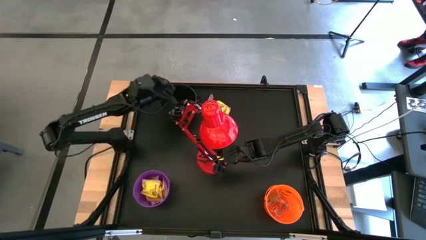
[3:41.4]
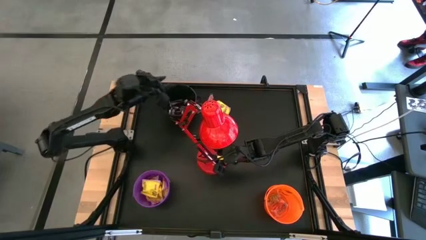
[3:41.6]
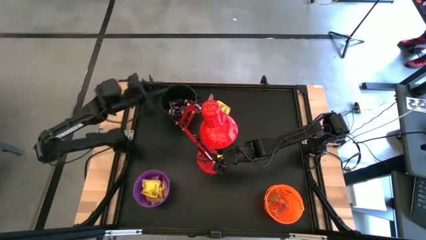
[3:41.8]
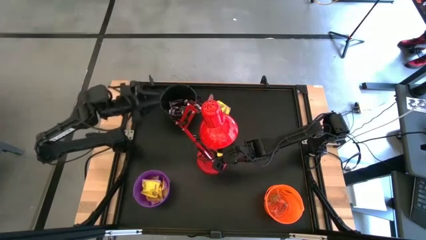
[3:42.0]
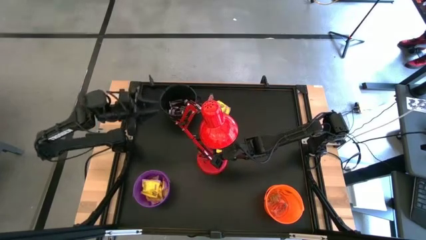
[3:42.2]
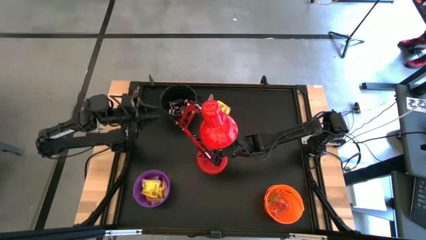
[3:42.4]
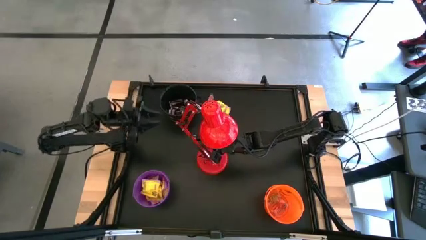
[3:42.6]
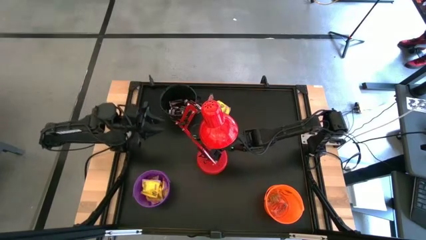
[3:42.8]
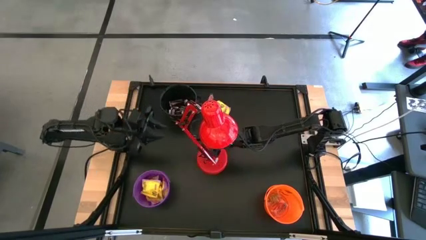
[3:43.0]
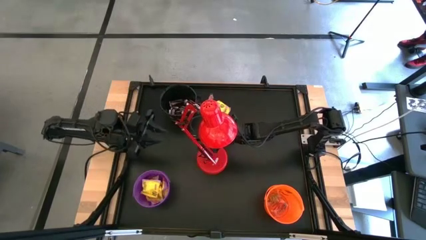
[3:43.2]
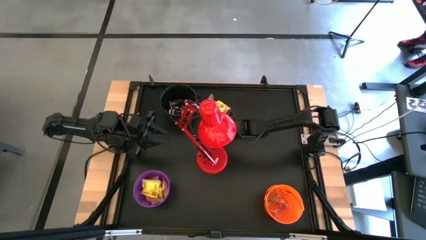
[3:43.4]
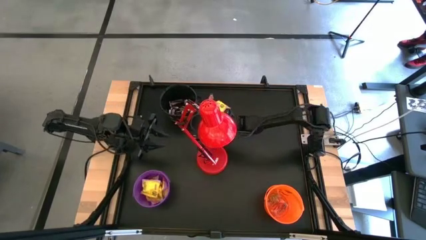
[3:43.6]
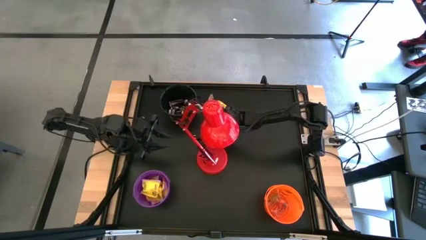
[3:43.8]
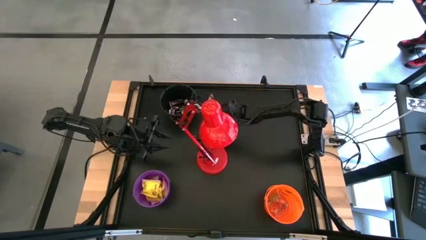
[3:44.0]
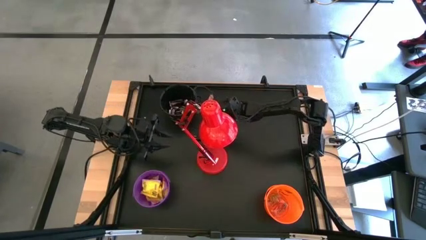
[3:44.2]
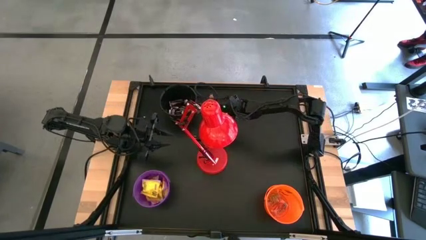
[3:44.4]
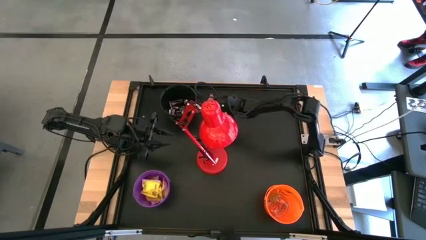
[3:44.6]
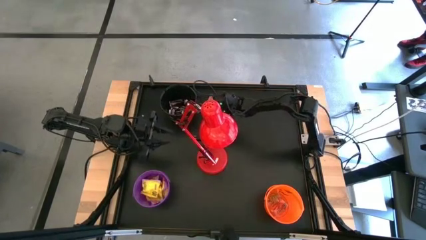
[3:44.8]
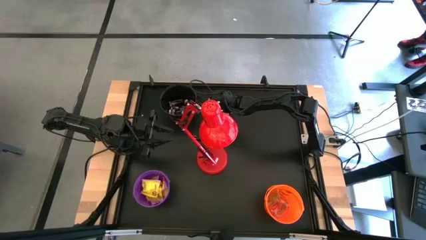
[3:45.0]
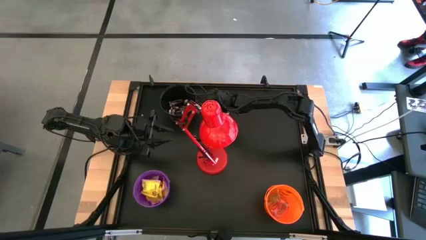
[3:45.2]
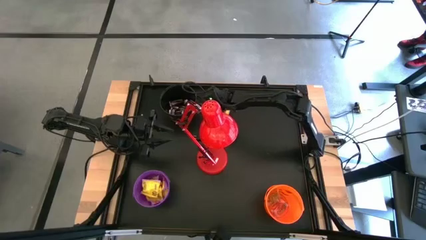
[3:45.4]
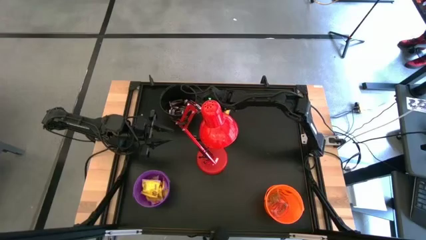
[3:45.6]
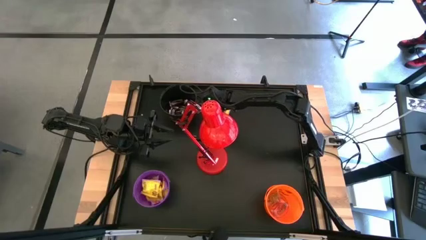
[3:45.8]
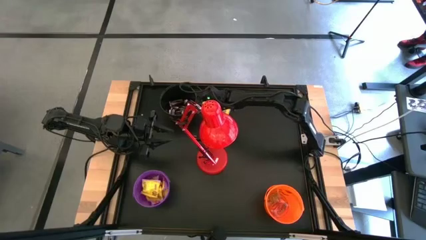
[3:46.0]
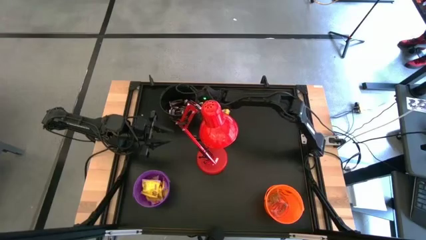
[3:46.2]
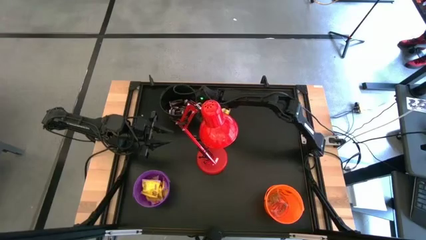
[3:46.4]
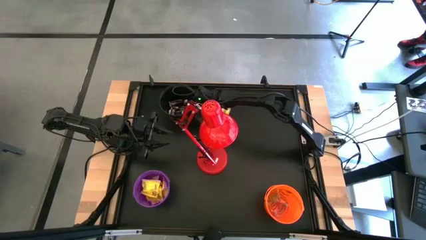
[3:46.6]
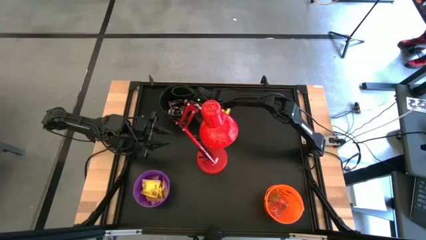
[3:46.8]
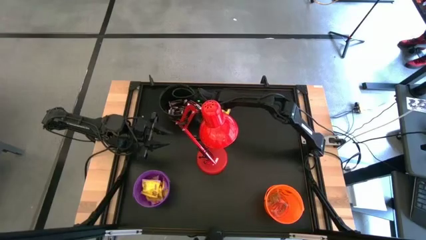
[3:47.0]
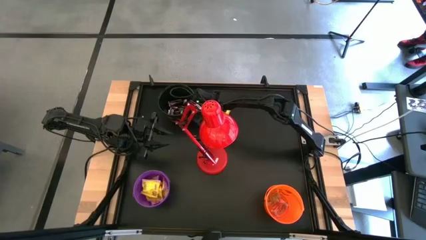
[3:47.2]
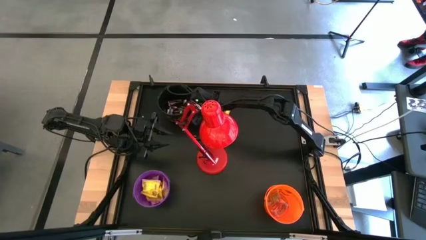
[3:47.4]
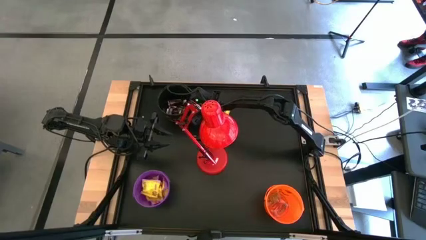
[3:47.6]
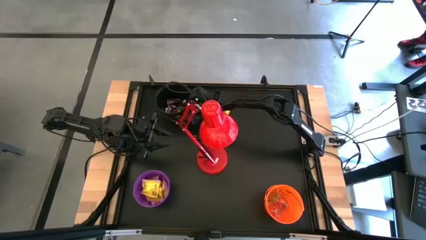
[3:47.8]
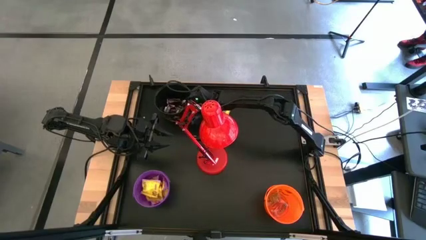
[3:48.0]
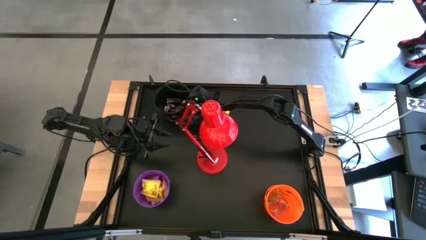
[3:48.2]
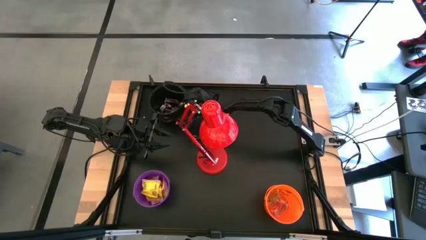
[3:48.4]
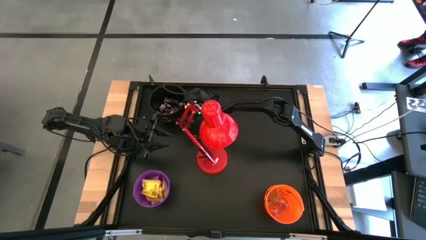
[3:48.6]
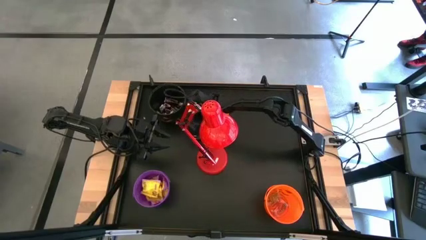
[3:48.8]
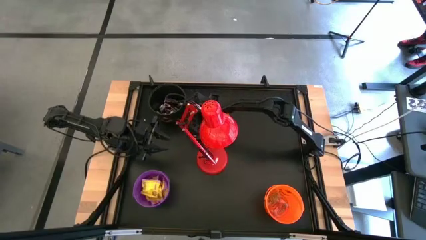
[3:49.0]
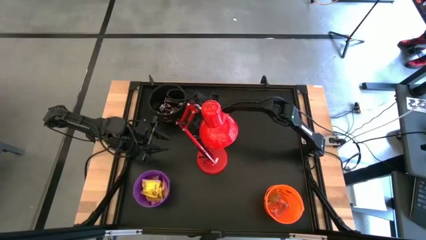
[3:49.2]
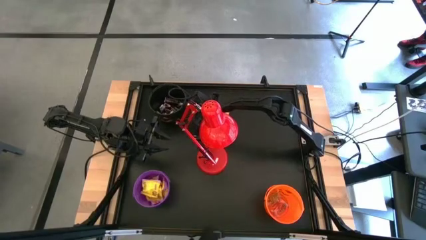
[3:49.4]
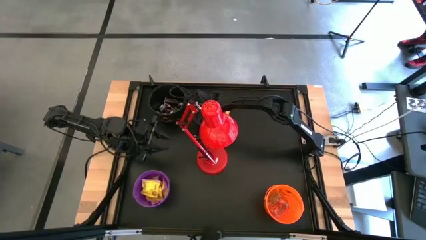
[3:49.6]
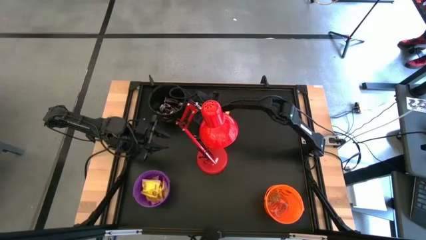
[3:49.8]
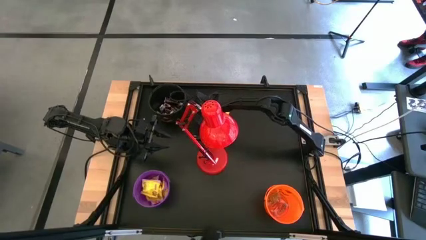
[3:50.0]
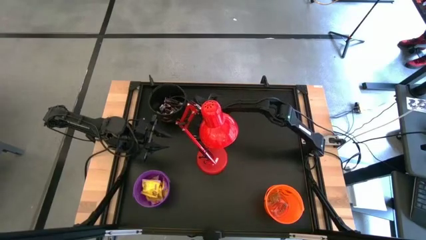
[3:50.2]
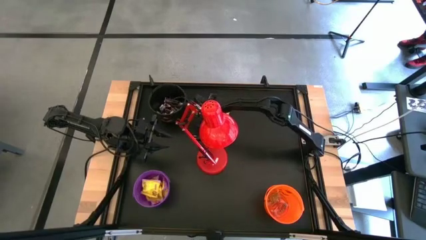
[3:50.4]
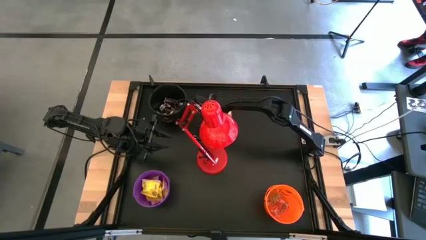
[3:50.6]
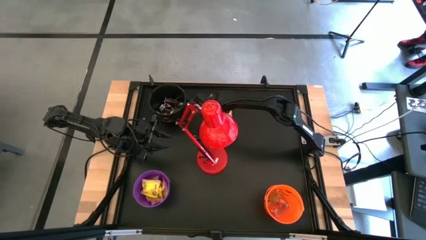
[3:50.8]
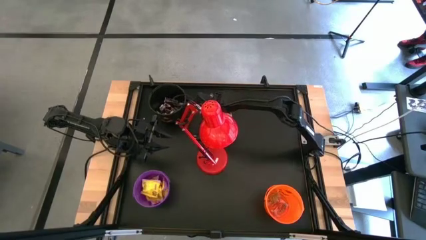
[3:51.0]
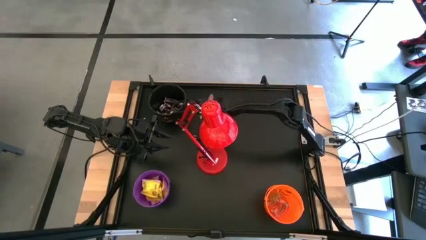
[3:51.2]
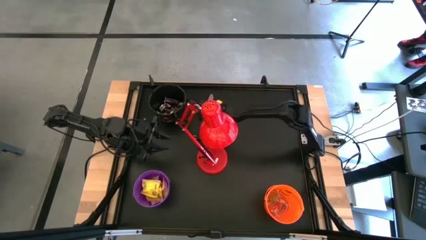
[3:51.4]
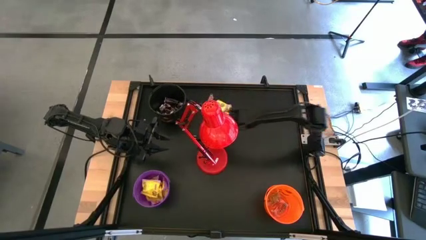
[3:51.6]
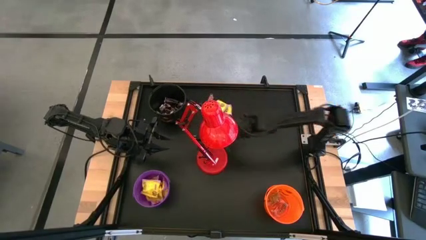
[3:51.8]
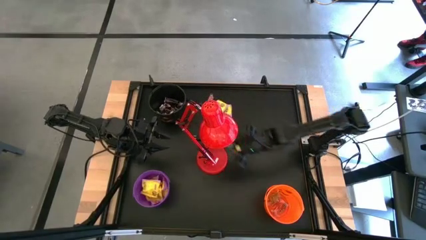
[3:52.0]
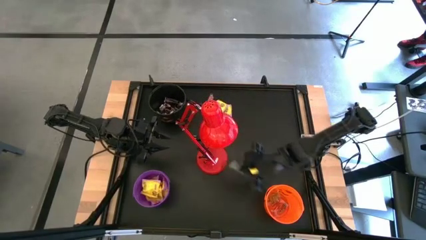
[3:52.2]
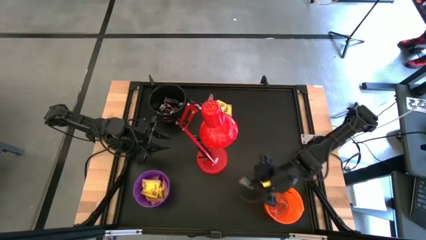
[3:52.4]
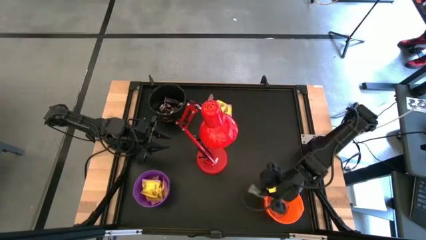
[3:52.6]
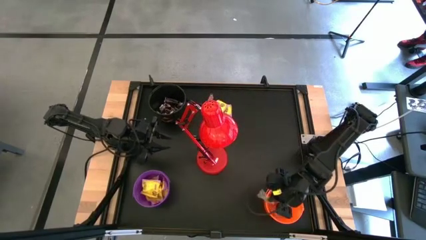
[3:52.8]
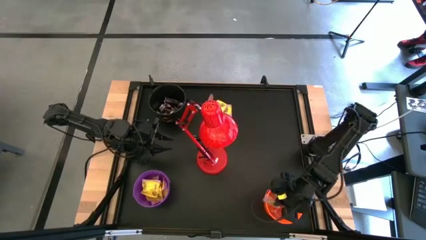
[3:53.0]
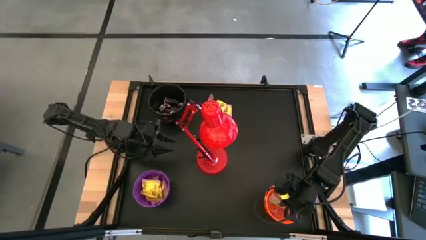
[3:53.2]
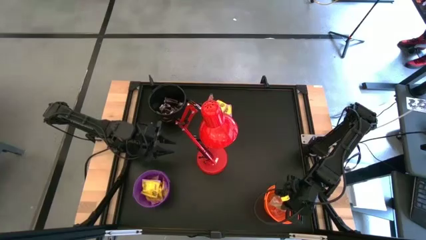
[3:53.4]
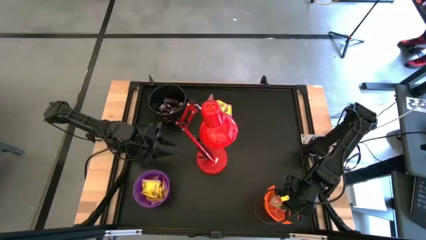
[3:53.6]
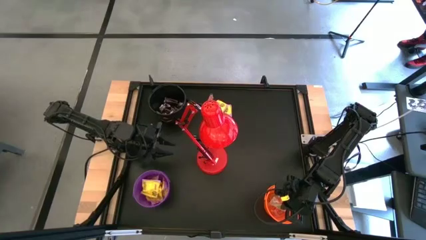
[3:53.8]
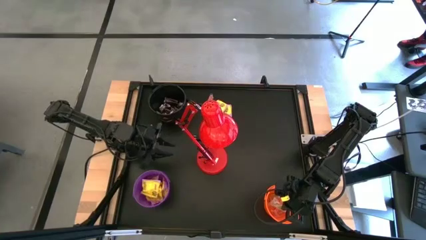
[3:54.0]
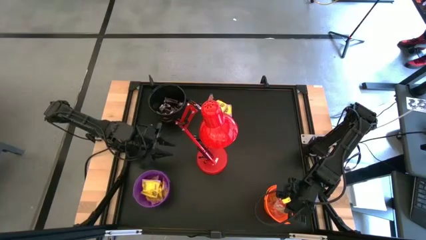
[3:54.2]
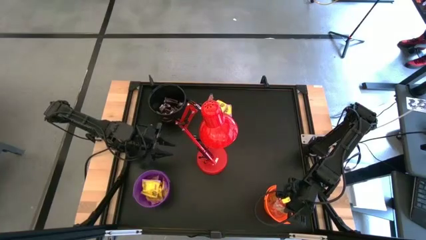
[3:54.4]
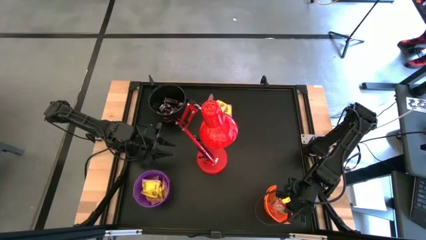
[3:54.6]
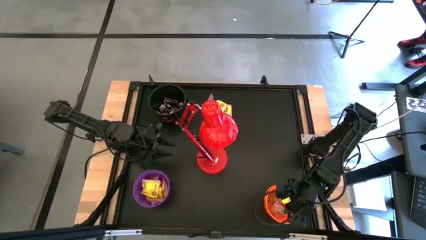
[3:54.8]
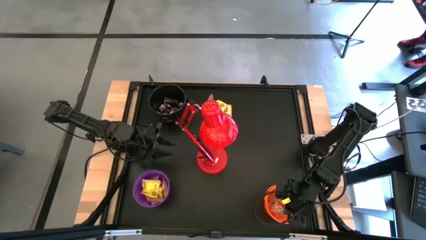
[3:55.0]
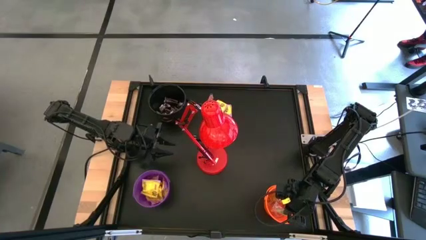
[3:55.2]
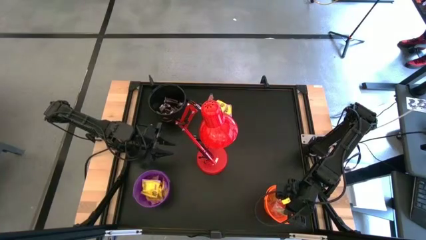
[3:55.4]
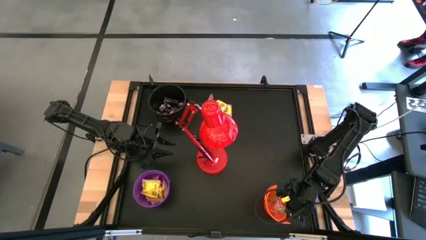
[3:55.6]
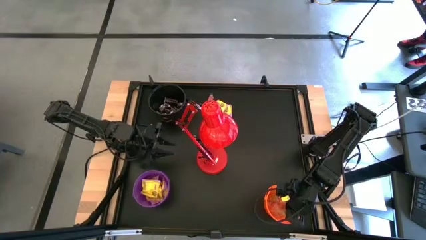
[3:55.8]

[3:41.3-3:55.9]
Task: Organize candy in baskets
Put the green gummy into the orange bucket
